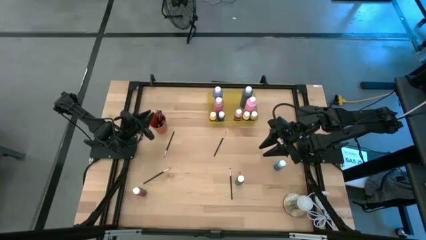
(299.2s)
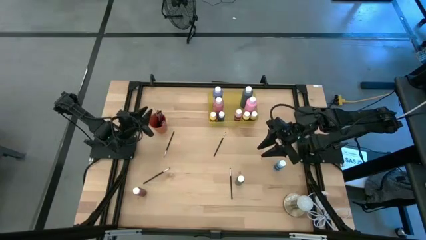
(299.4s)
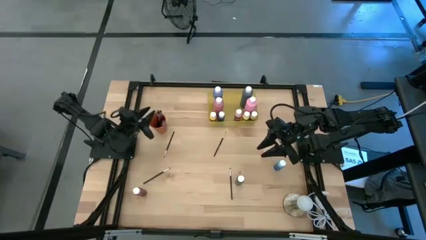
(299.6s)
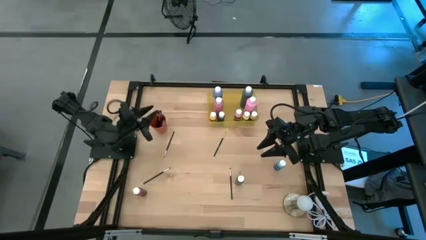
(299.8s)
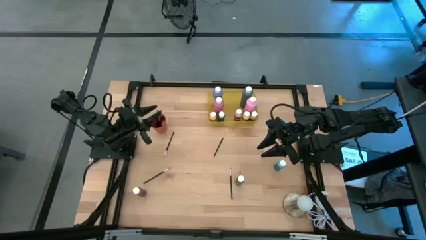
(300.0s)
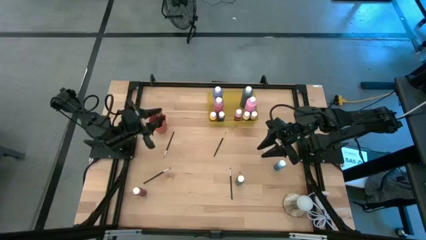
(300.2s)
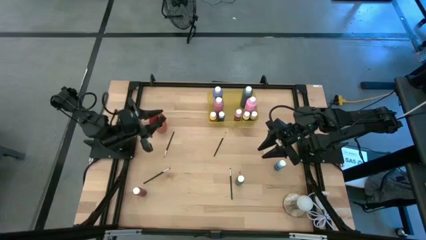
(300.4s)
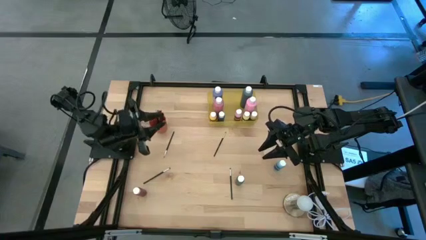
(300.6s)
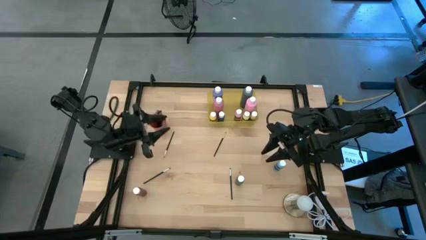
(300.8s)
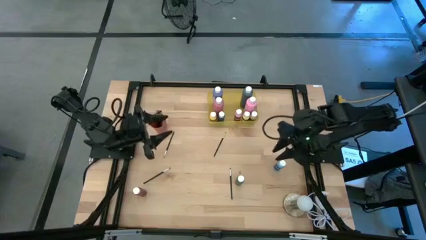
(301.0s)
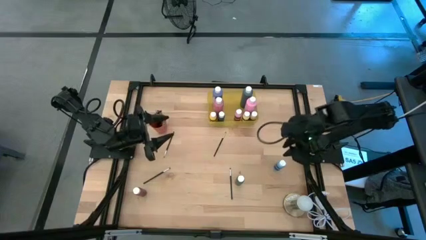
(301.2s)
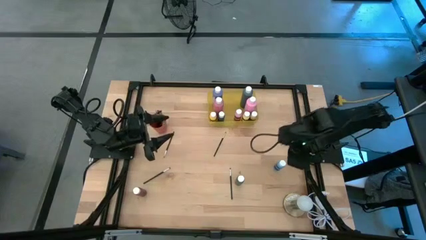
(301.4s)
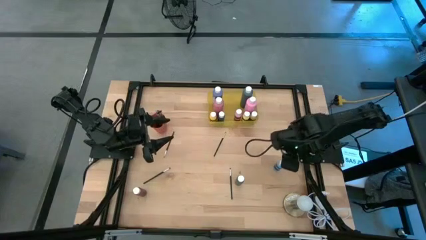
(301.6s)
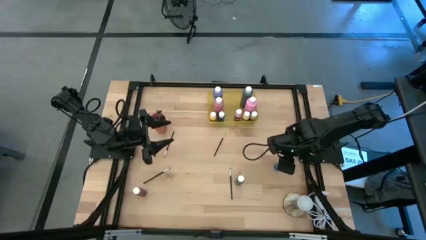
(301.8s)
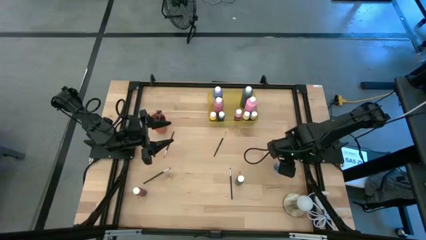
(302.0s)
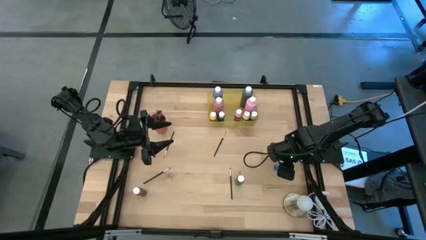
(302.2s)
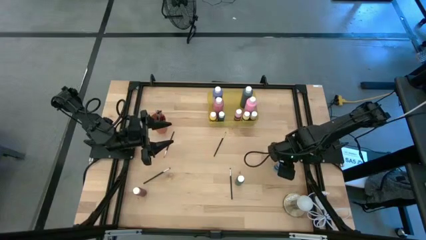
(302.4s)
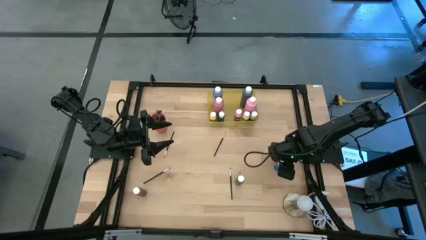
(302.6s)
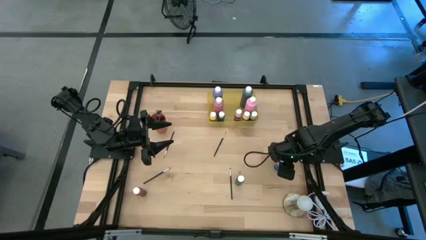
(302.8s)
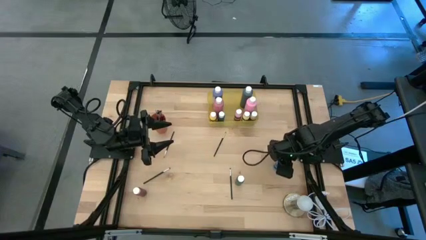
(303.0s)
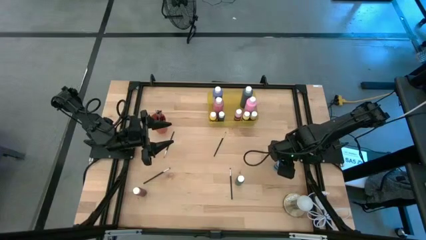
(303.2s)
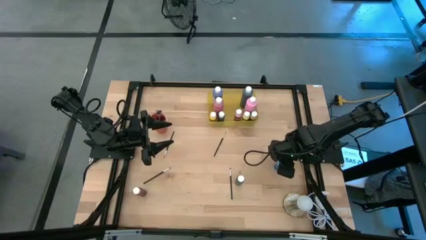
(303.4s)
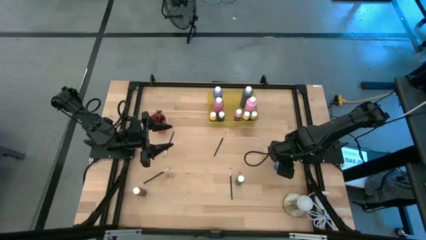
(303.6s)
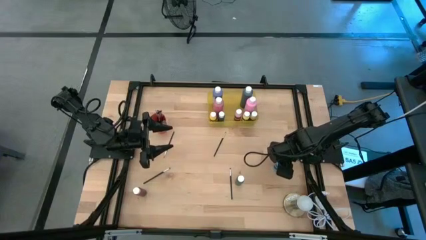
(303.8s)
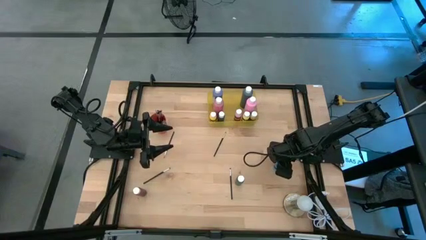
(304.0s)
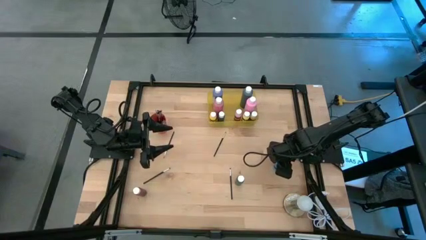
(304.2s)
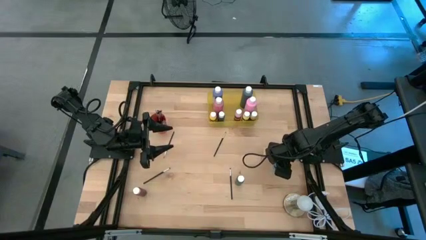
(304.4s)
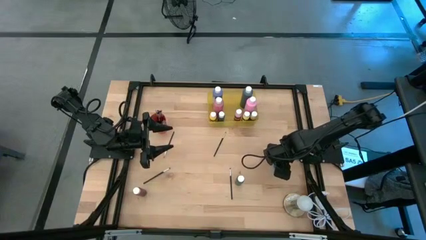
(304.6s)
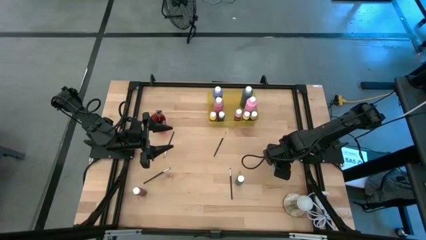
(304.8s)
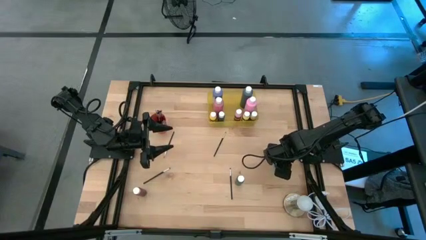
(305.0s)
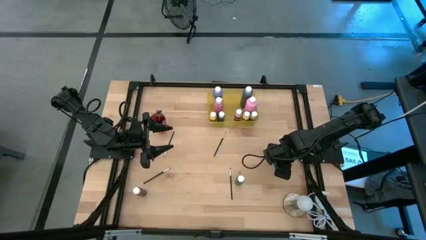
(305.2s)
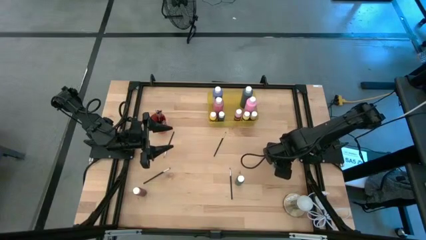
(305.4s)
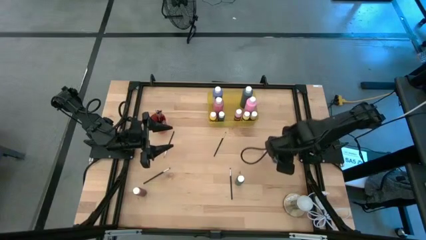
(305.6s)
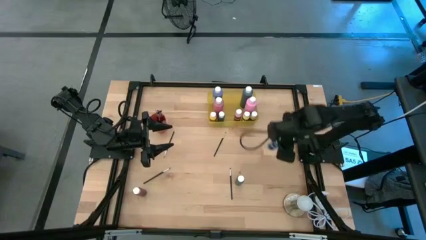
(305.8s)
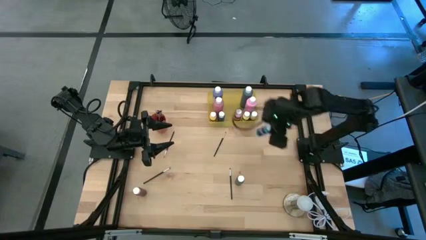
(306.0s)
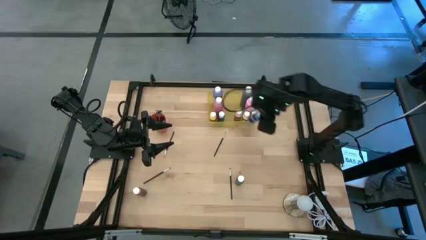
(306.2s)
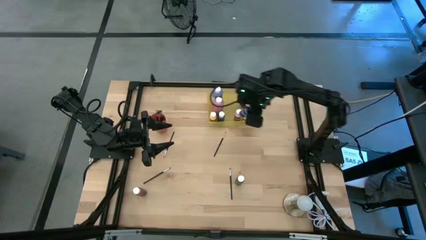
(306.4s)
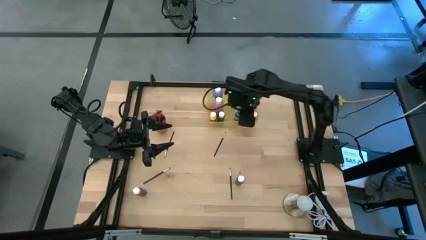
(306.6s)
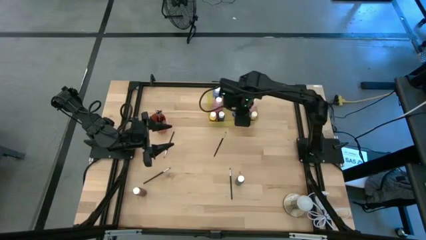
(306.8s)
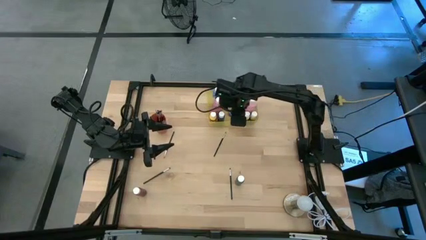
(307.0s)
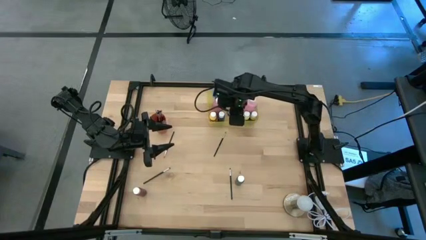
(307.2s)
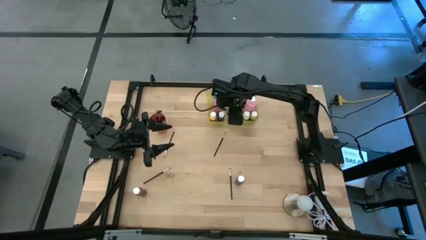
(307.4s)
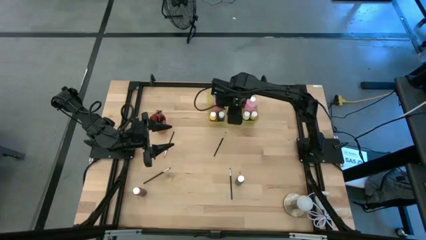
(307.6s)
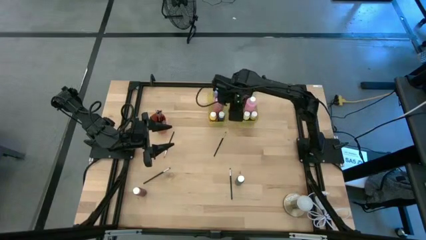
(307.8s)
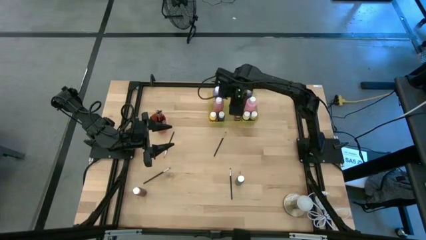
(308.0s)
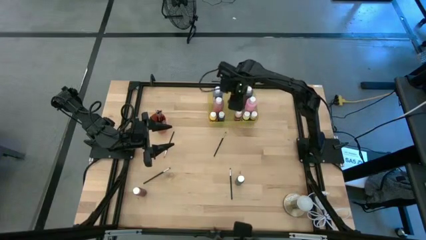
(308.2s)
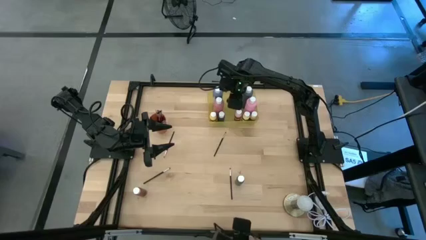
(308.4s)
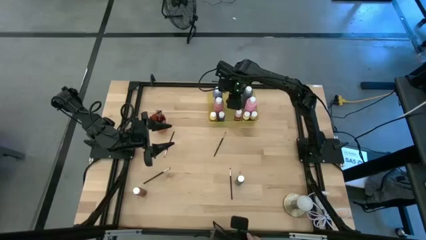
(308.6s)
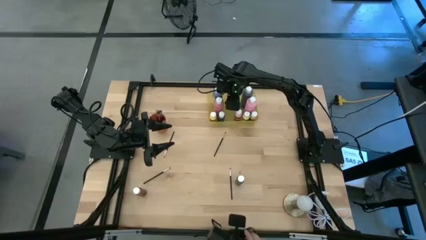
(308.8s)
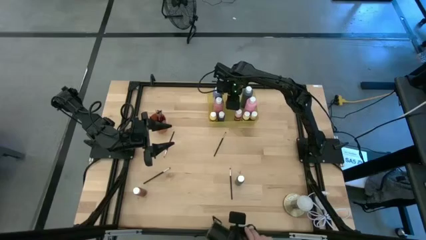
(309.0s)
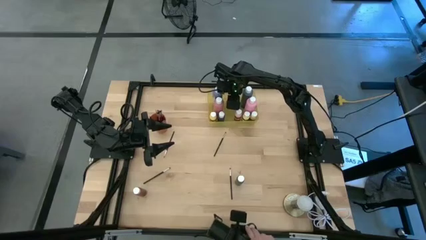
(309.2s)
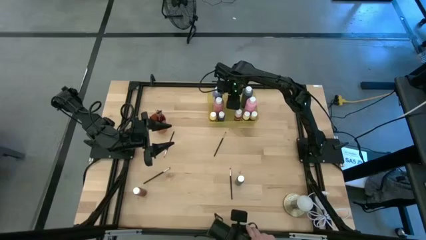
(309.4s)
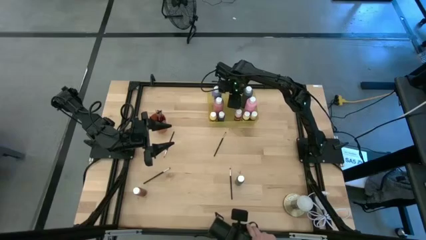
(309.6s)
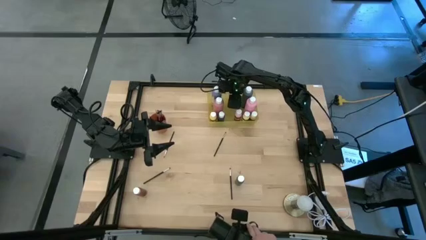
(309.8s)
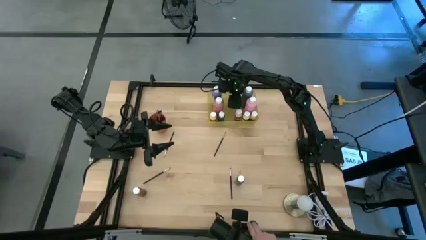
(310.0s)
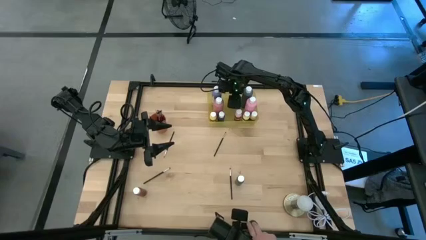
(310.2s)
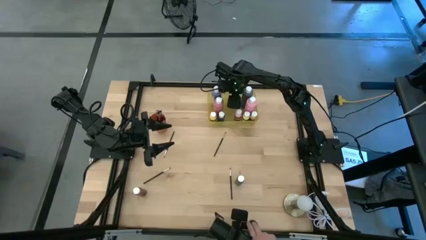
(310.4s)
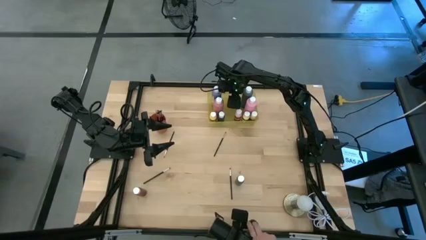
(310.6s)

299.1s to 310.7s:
Task: Pick & Place Paint Supplies
Put the small light blue paint bottle into the yellow bin

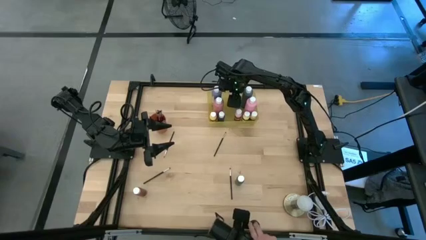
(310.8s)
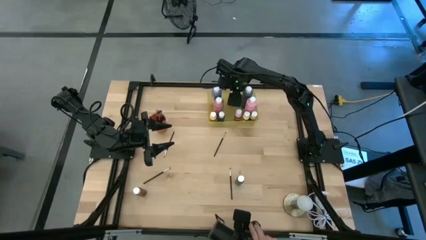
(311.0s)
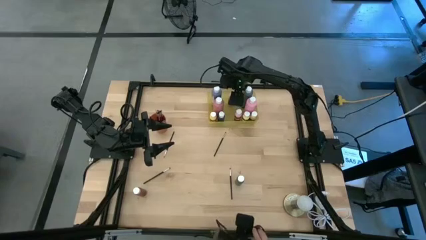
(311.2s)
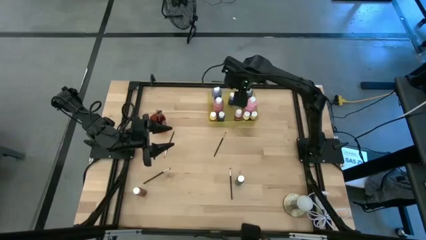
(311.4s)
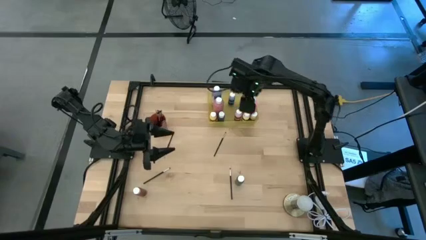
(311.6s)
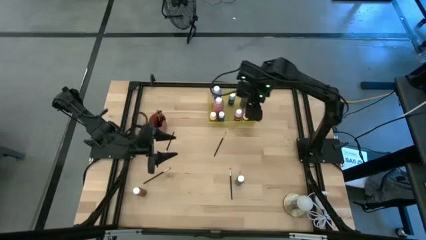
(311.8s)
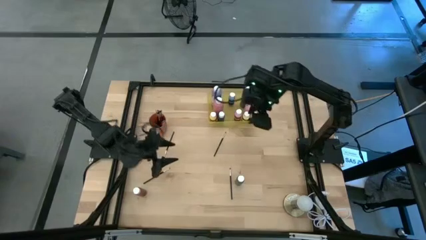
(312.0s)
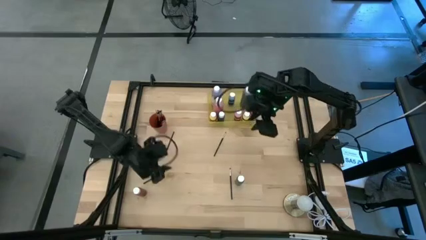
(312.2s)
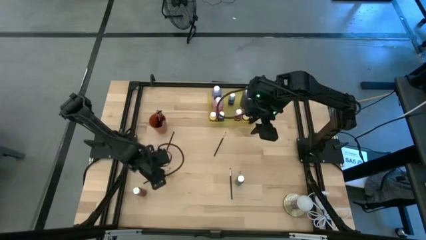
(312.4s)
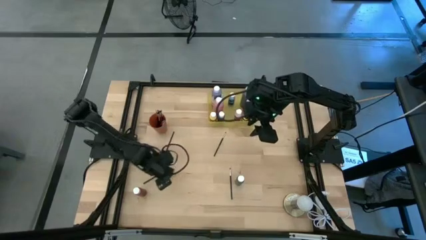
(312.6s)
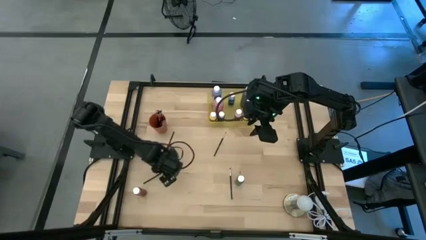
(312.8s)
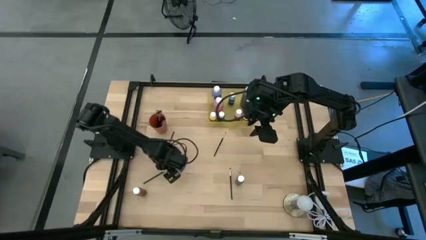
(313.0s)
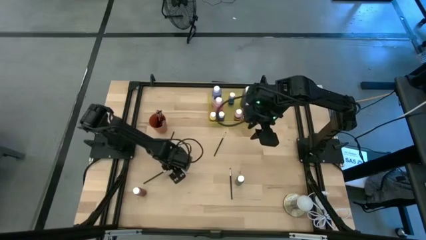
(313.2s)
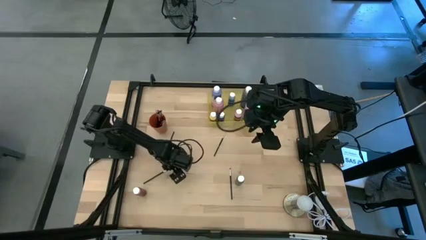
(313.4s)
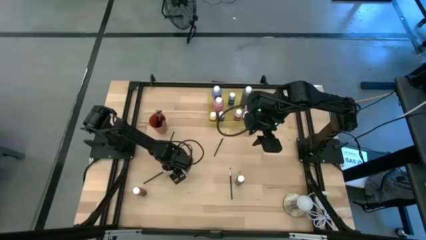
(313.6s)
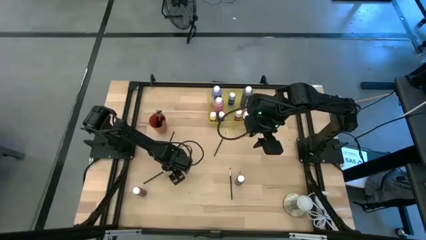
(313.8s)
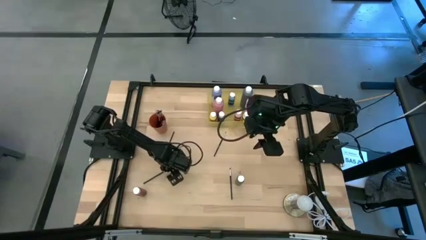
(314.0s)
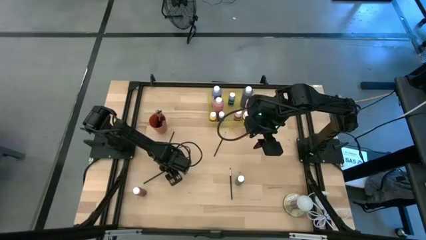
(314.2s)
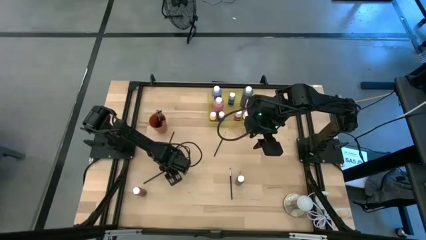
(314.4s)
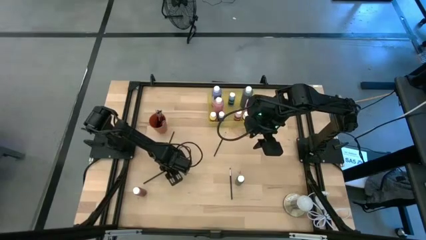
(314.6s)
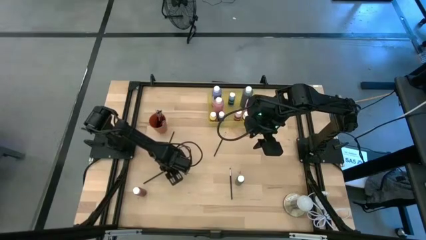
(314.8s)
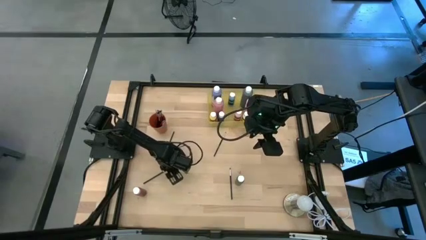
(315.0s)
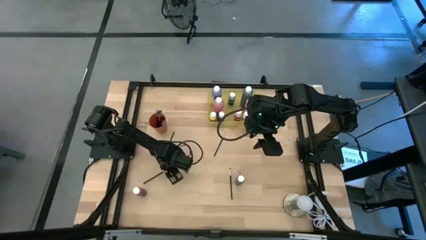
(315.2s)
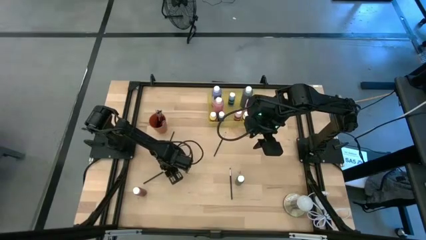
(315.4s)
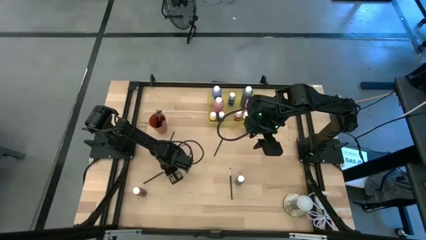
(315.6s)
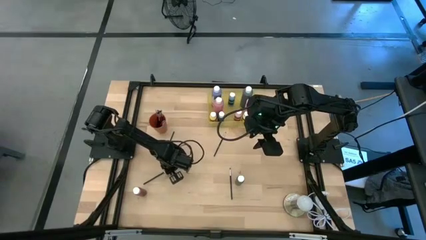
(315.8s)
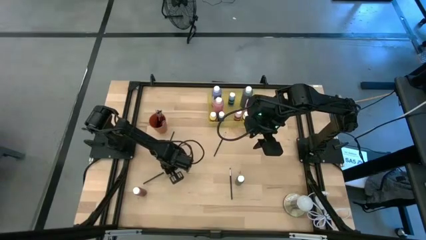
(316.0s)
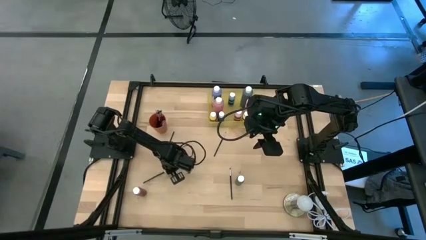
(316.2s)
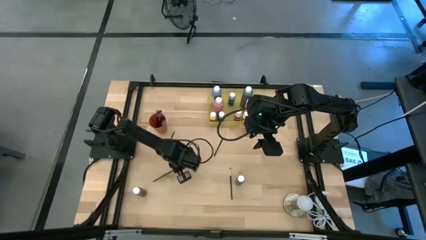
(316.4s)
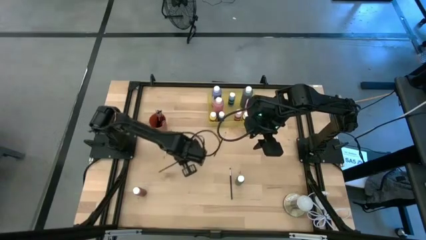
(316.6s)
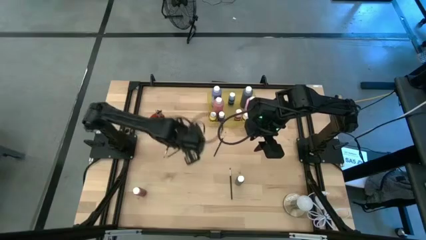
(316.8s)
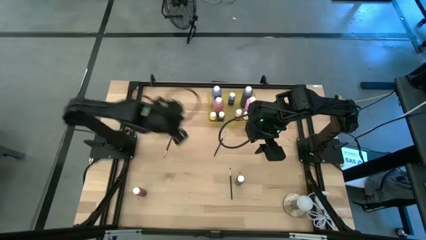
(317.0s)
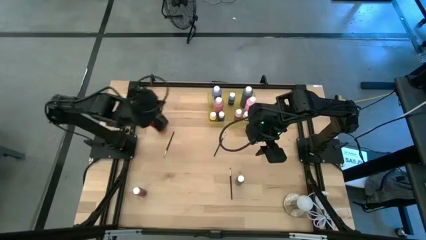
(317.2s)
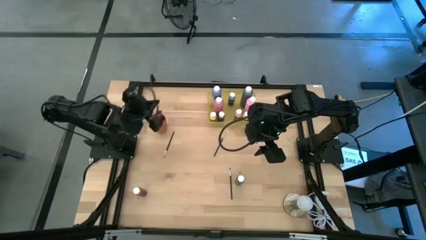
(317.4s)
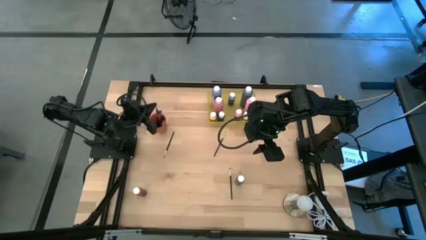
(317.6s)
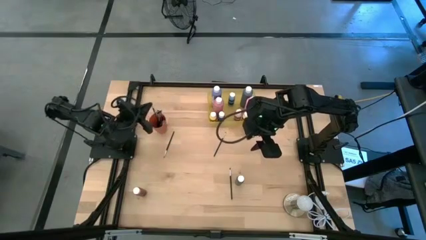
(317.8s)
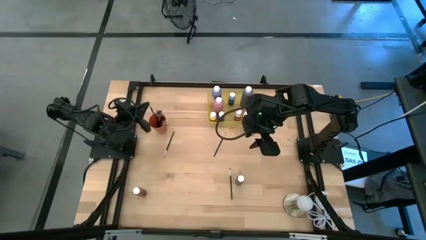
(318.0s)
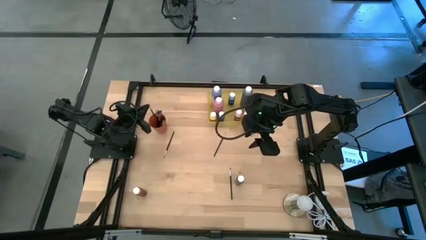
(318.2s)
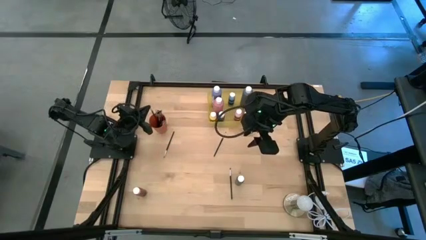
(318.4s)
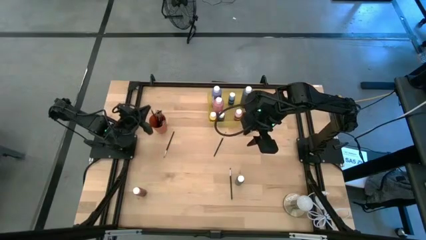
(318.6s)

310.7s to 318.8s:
Put the silver paint brush into the orange cup
